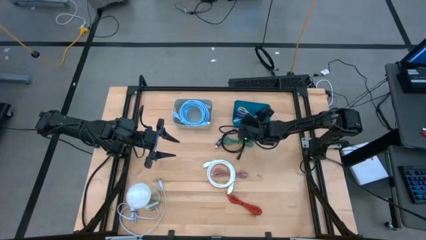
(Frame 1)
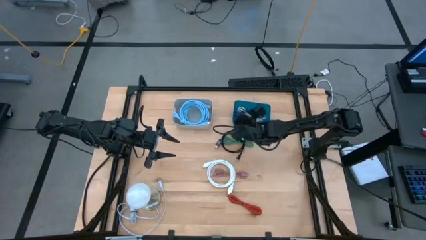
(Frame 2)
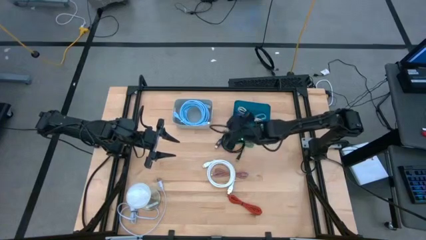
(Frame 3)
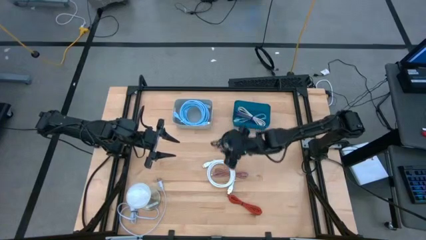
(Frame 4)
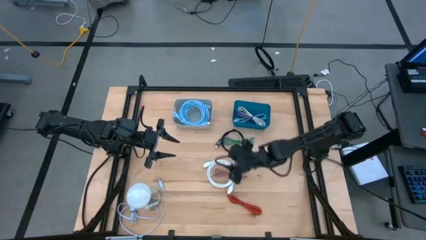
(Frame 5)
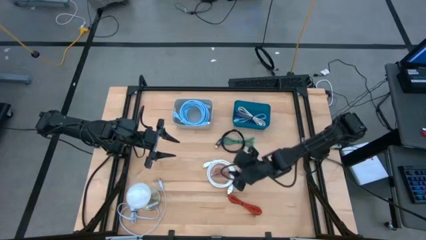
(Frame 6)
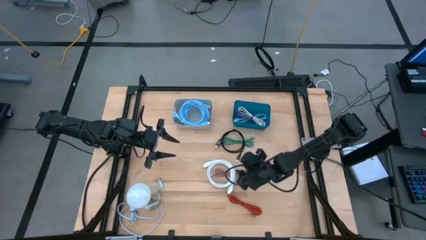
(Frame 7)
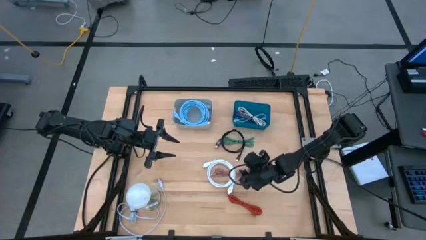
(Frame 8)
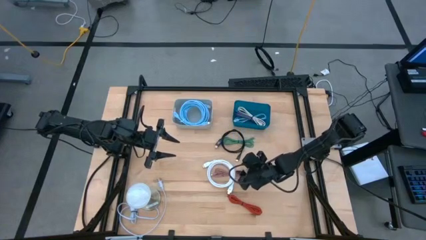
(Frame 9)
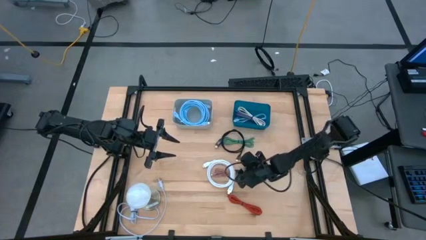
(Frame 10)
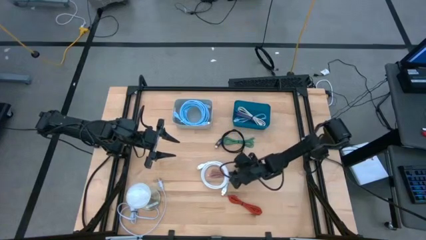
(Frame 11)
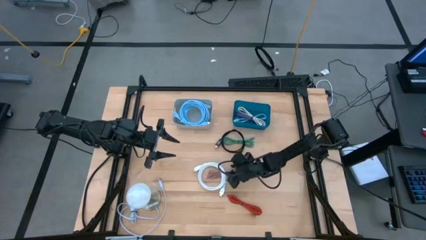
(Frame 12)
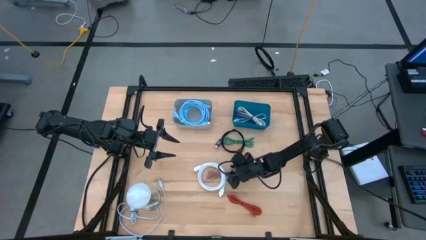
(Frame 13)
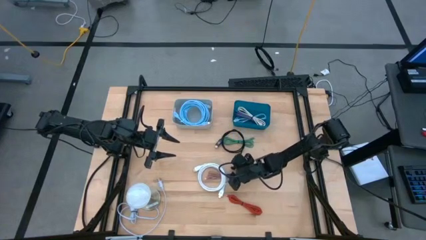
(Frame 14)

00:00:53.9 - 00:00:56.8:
Task: Pick & Place USB Port
Adjust the white hdmi cable on the table

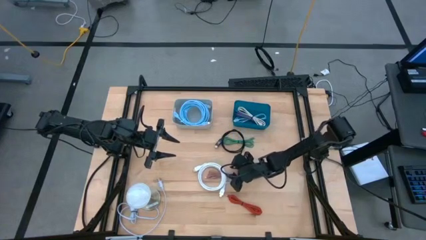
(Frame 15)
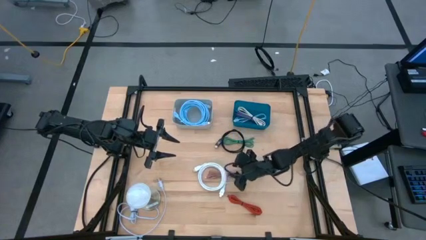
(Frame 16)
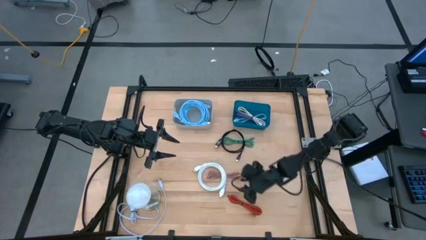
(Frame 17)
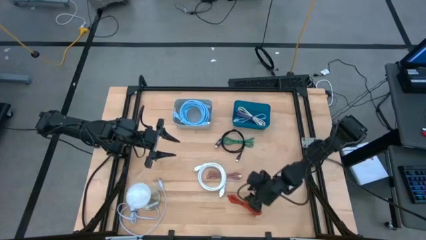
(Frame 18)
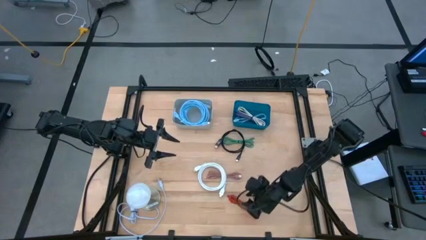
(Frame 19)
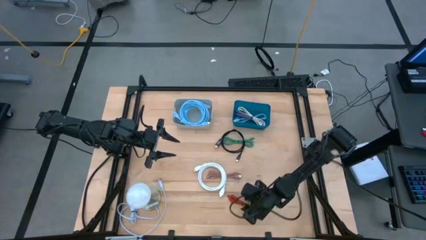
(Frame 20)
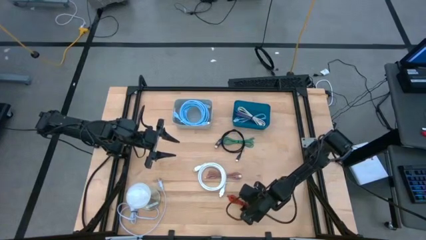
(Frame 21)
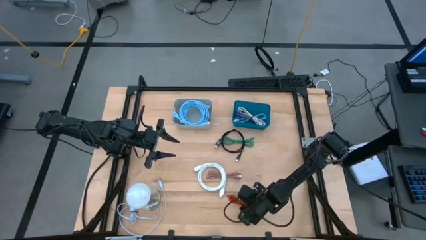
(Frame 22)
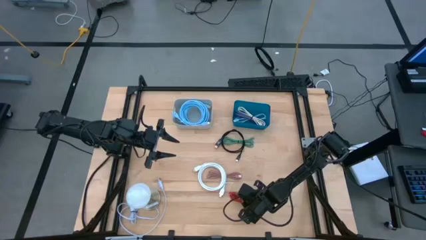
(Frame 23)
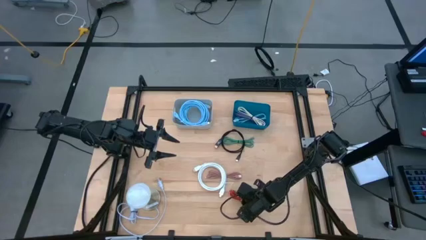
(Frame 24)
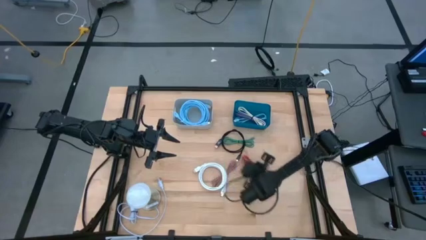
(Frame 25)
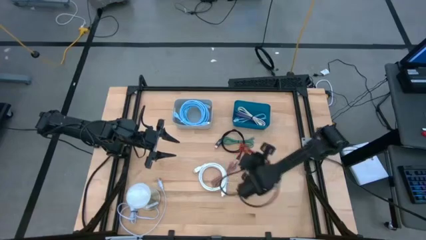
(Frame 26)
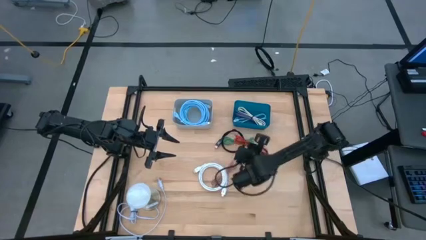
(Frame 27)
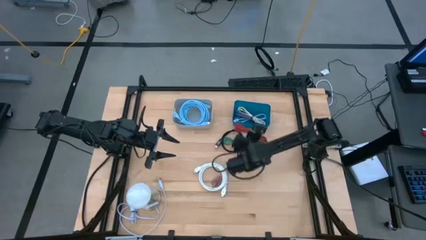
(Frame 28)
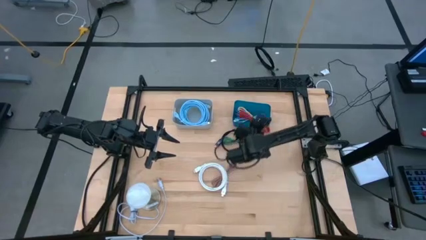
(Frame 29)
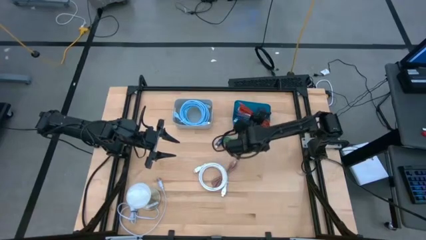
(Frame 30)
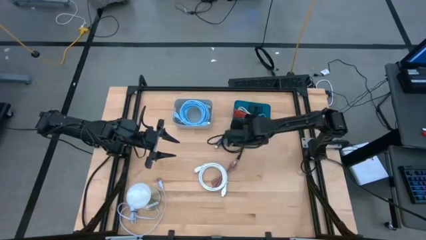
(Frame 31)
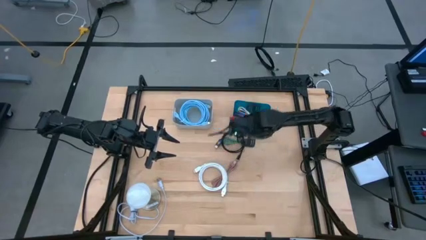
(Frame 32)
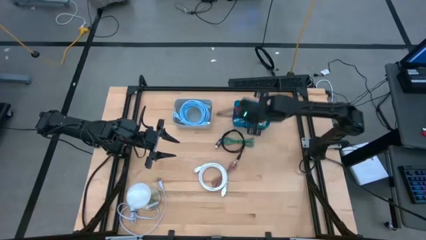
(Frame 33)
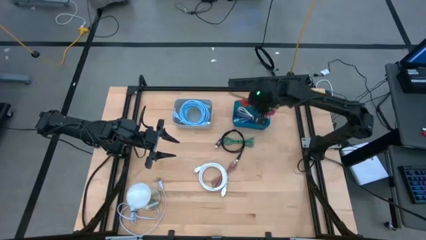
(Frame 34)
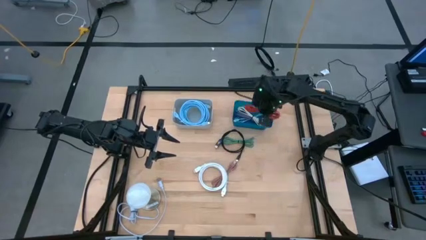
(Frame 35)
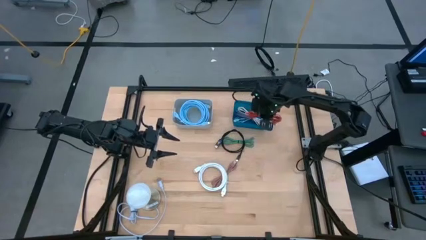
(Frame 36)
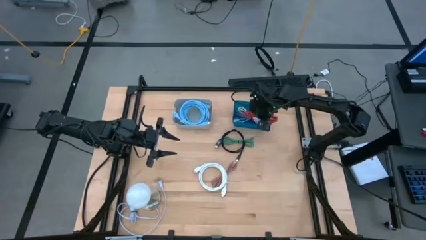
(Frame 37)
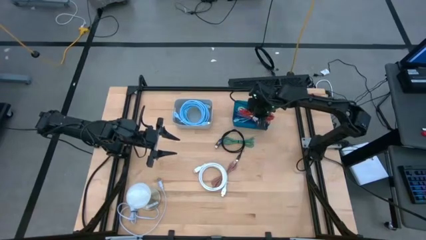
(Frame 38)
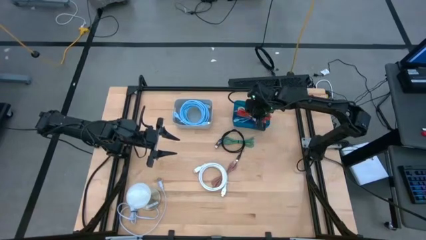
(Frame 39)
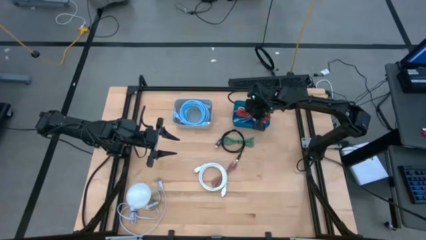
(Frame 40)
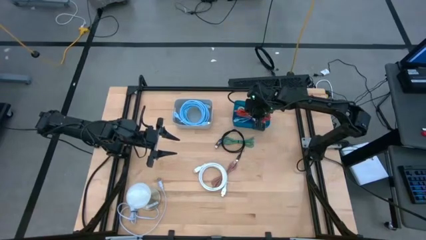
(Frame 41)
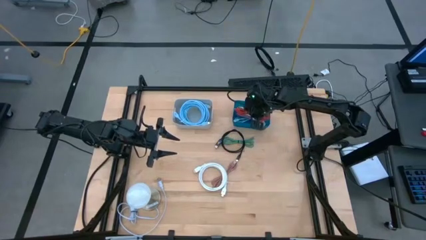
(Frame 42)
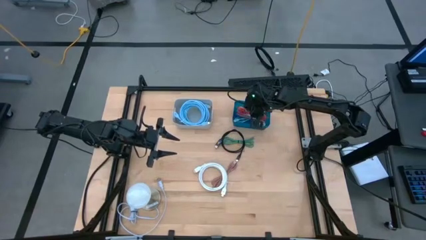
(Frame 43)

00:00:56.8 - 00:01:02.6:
Put the red charger cable into the blue bin

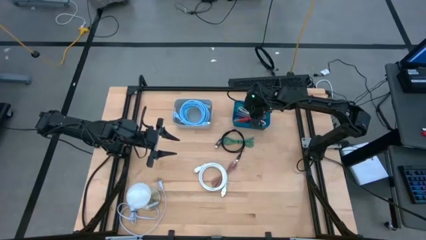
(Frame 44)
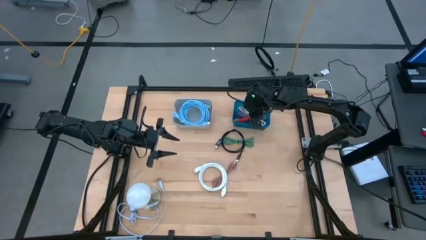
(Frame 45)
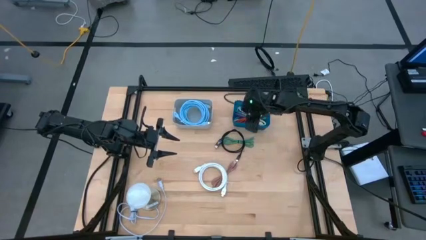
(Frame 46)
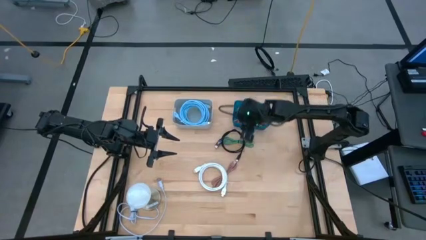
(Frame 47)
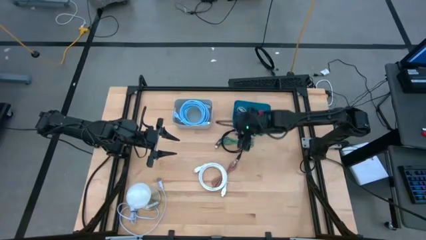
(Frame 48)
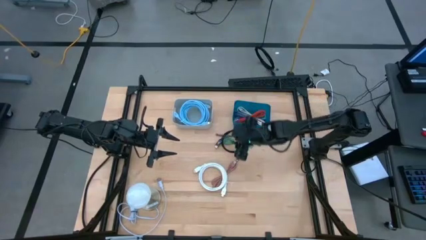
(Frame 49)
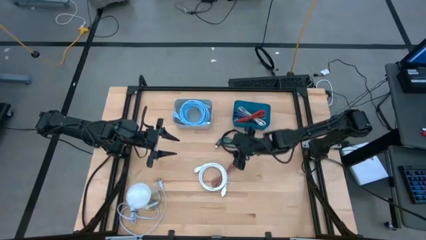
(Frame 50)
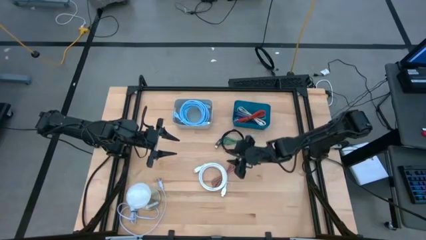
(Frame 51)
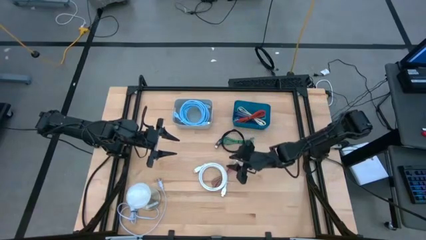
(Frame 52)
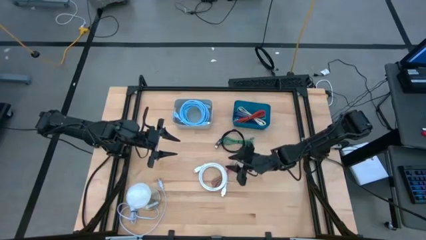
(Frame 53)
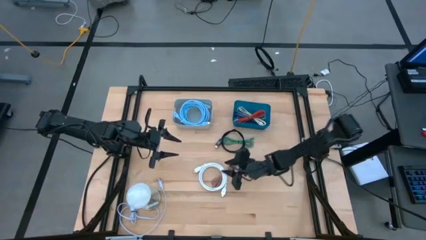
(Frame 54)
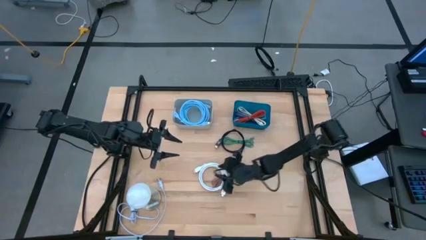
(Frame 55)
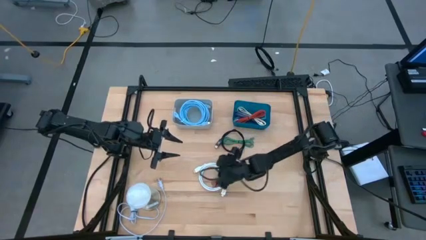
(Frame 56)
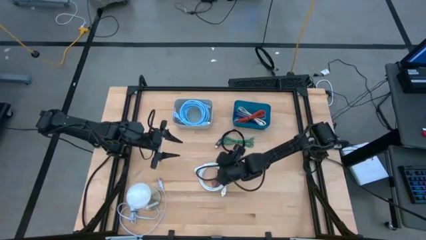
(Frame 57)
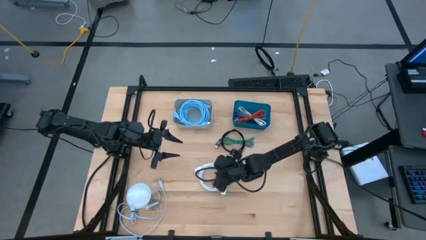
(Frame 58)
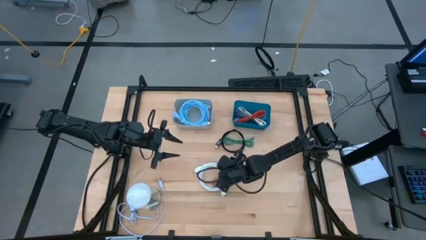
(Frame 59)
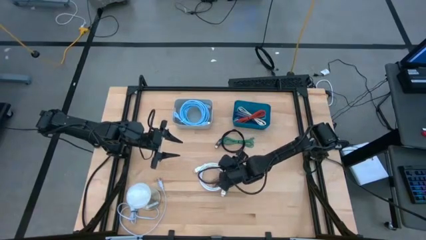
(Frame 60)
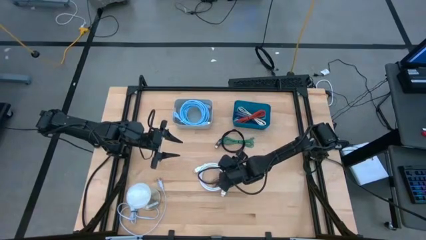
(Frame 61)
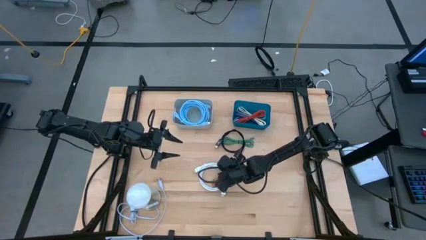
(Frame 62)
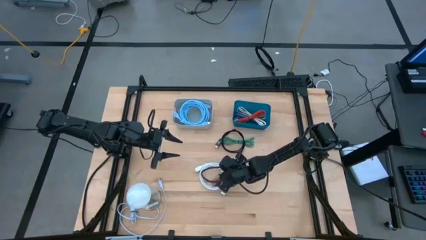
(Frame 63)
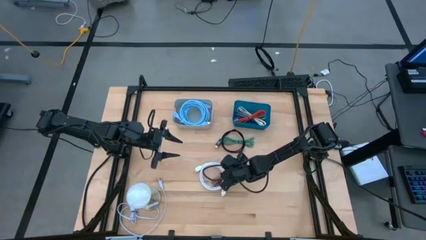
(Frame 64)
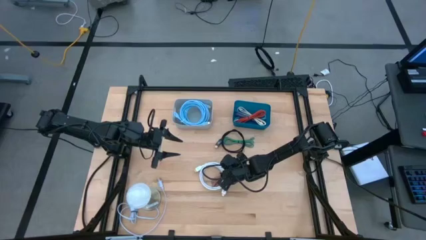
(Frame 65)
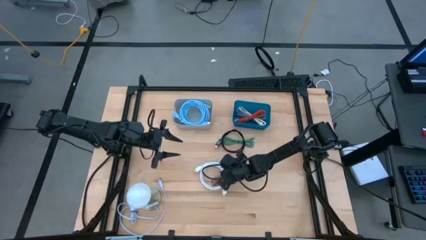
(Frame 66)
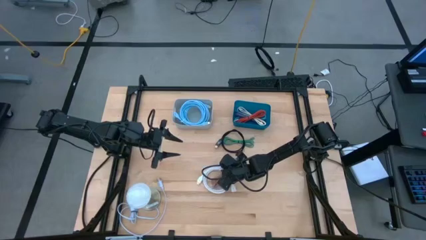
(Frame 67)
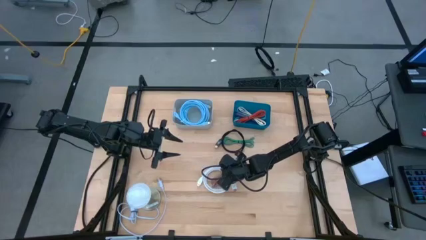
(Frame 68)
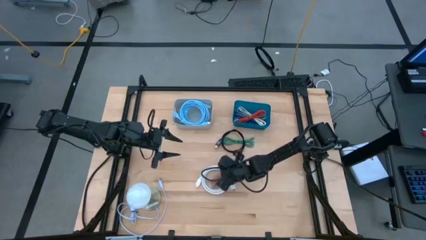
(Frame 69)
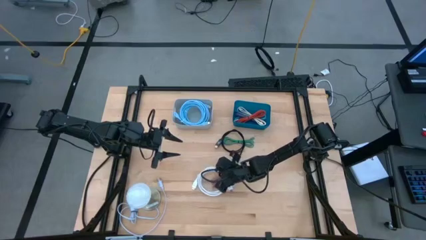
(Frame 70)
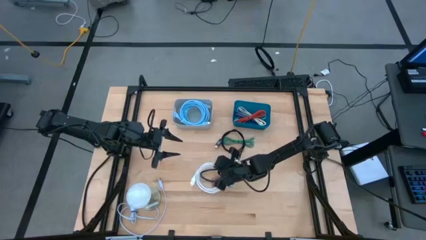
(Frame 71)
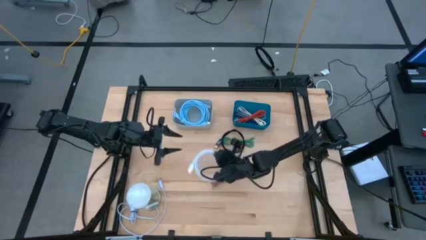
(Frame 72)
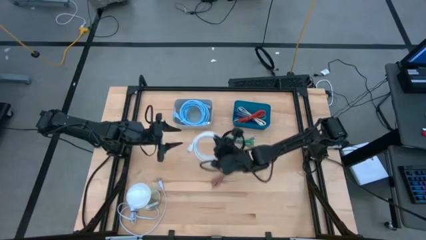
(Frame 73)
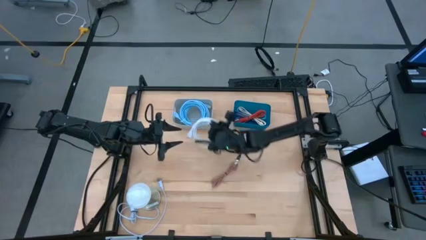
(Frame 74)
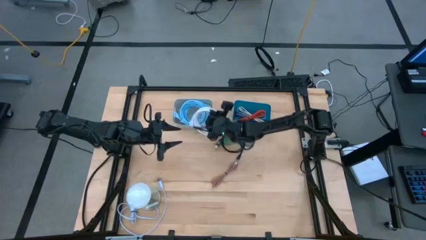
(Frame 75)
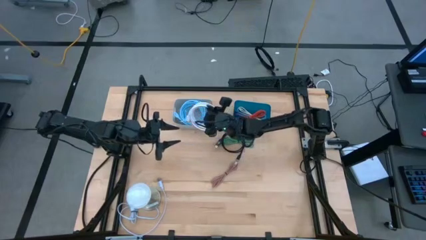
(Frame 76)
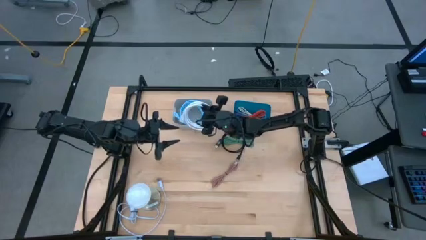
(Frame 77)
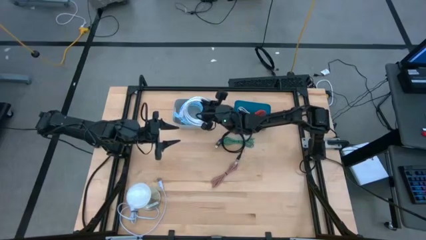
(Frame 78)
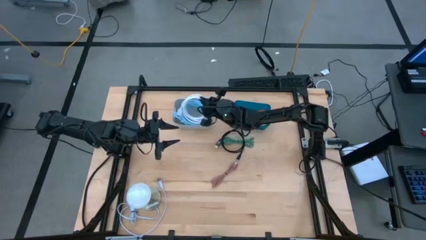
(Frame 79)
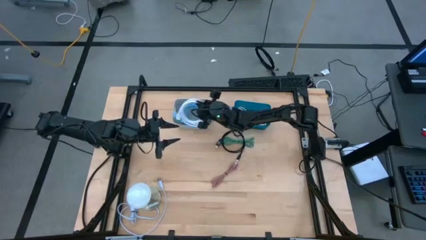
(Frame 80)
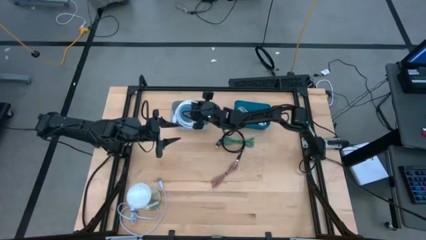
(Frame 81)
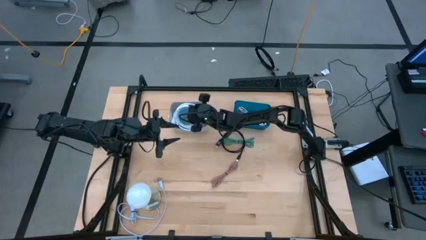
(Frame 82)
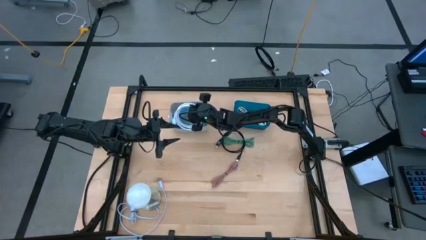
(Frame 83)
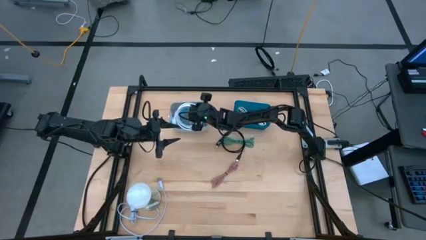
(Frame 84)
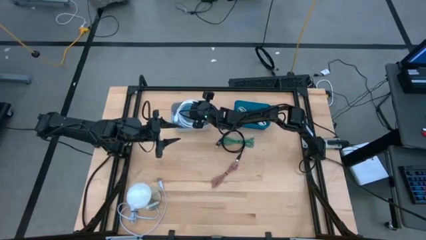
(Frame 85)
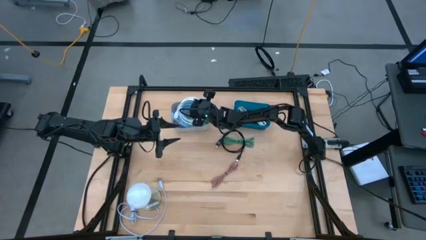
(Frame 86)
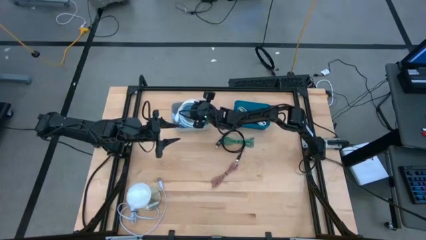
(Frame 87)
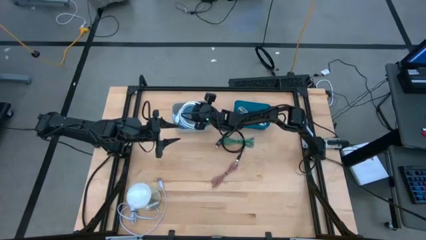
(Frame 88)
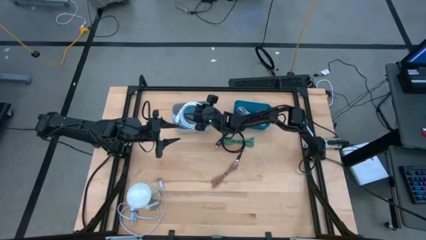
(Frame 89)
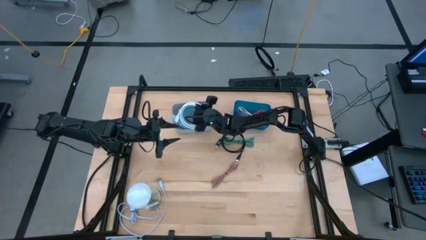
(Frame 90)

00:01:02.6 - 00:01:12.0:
Put the white hdmi cable into the gray bin
